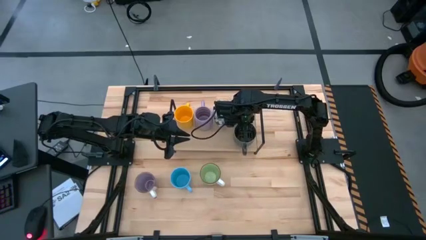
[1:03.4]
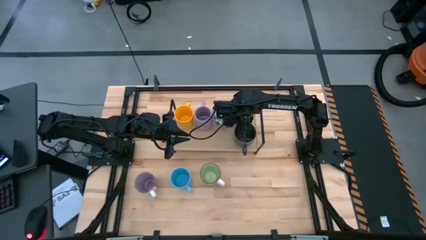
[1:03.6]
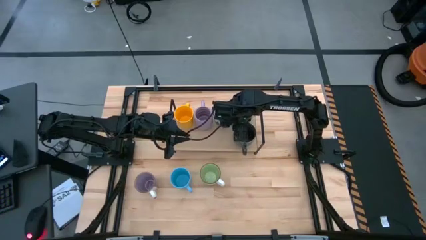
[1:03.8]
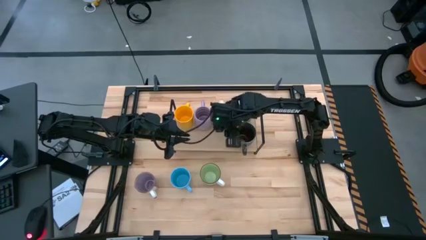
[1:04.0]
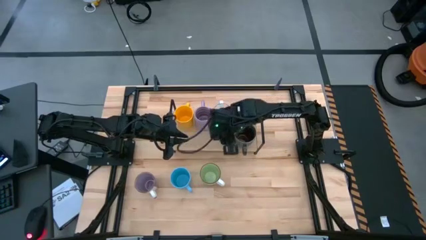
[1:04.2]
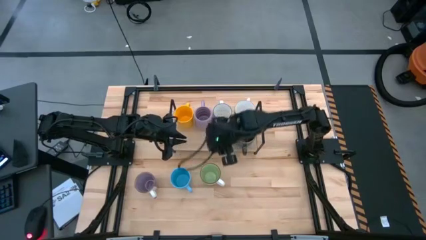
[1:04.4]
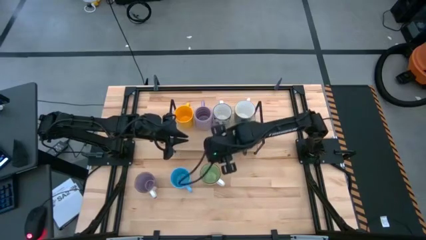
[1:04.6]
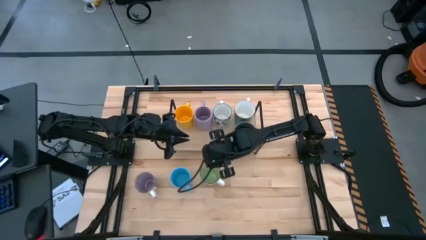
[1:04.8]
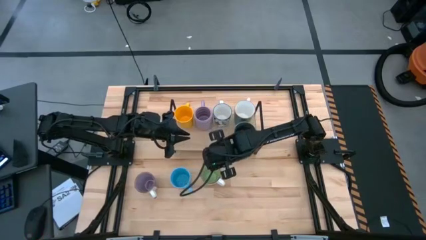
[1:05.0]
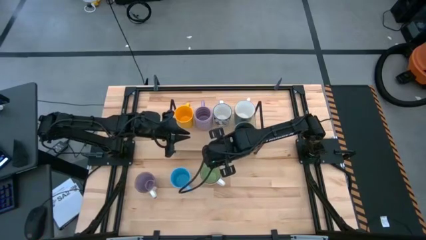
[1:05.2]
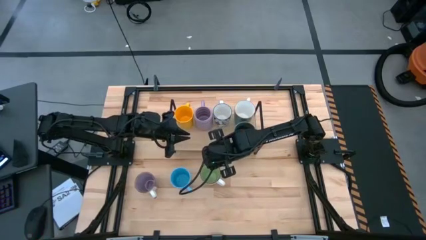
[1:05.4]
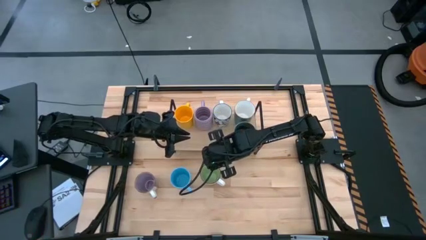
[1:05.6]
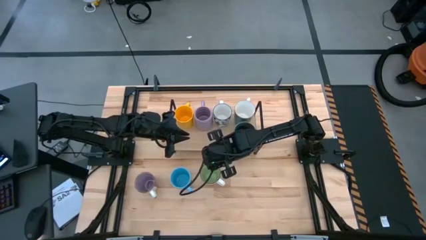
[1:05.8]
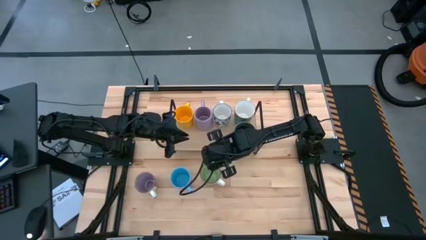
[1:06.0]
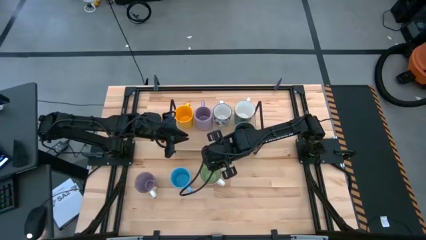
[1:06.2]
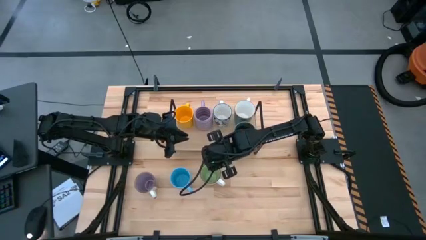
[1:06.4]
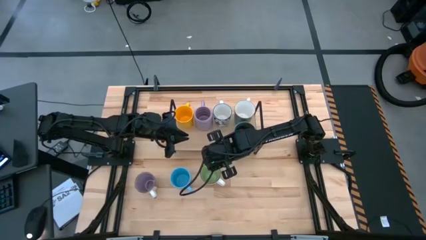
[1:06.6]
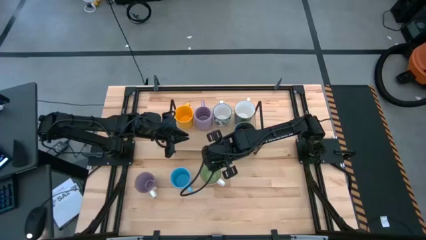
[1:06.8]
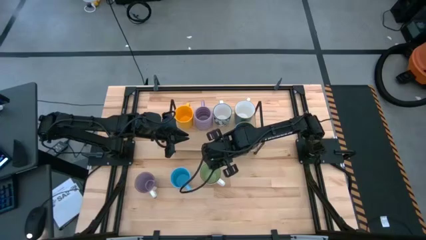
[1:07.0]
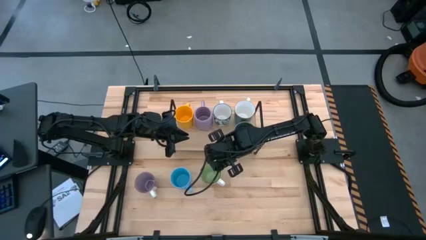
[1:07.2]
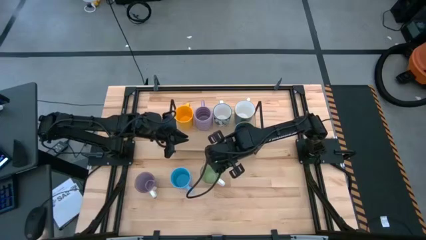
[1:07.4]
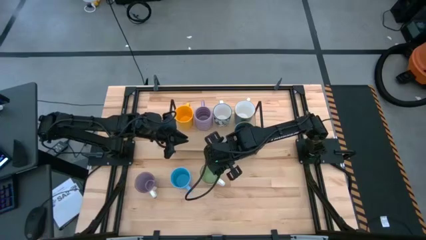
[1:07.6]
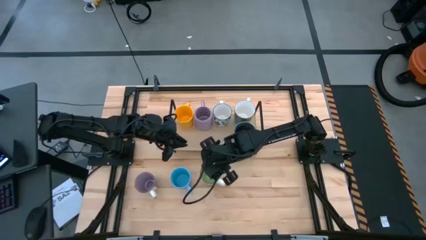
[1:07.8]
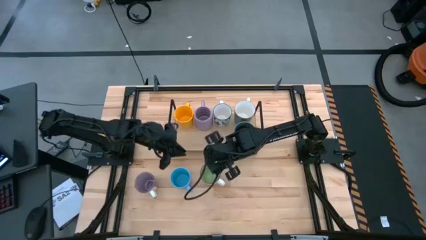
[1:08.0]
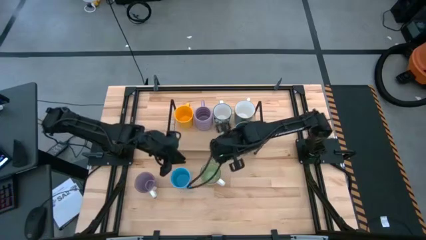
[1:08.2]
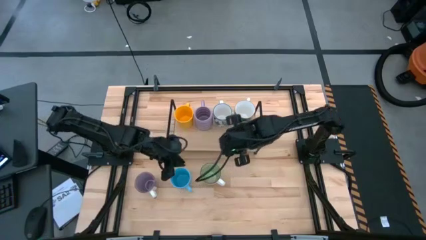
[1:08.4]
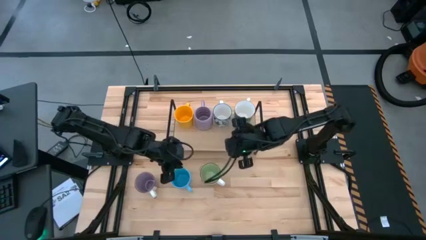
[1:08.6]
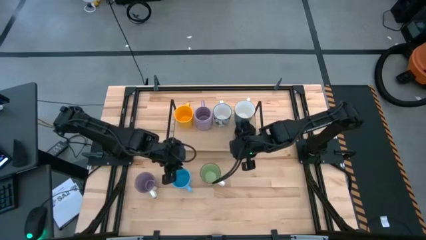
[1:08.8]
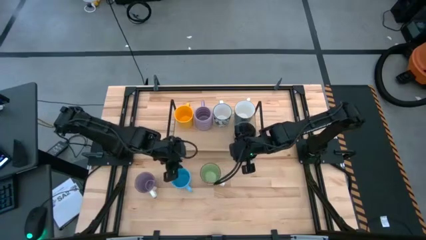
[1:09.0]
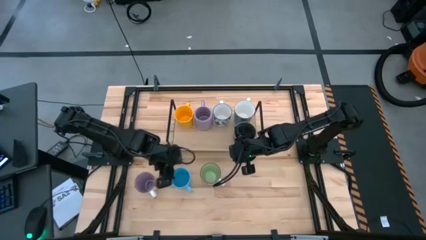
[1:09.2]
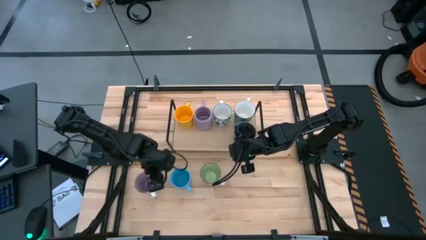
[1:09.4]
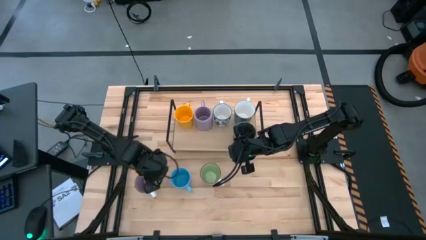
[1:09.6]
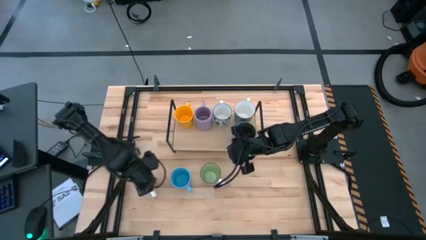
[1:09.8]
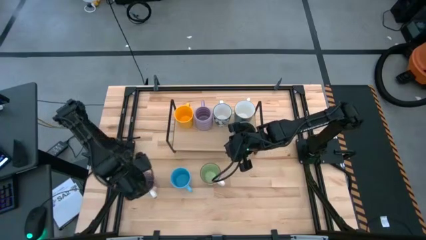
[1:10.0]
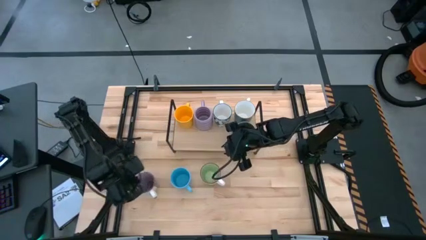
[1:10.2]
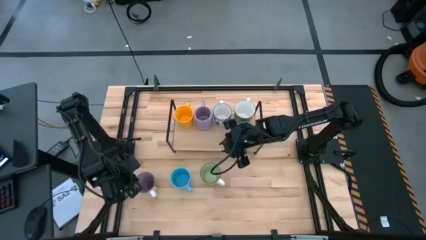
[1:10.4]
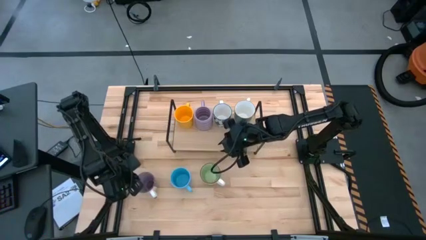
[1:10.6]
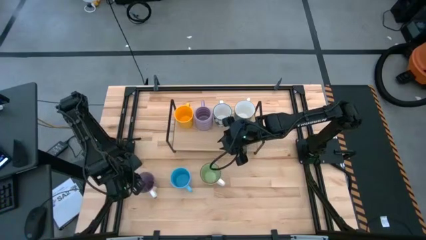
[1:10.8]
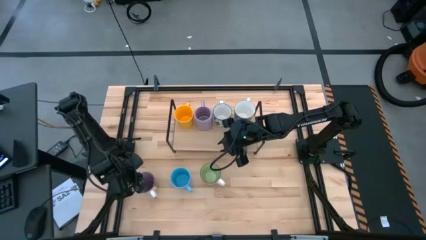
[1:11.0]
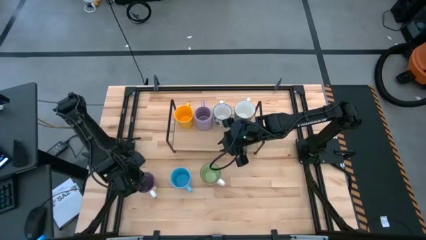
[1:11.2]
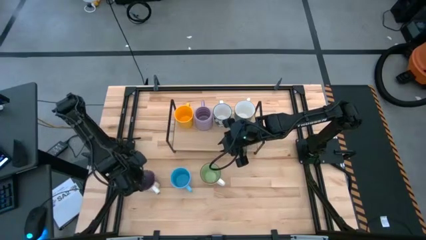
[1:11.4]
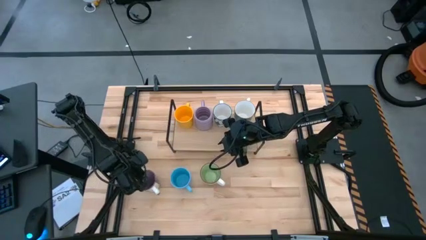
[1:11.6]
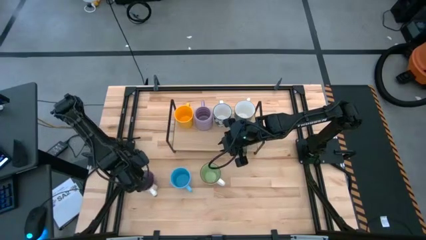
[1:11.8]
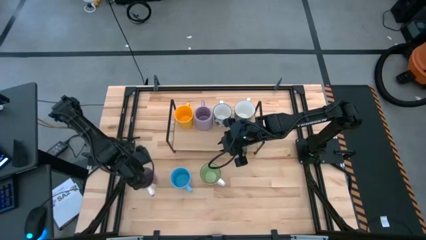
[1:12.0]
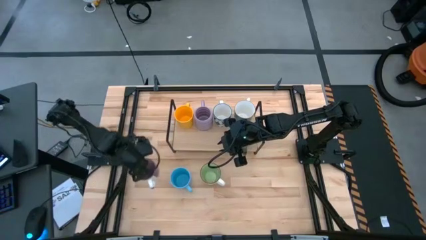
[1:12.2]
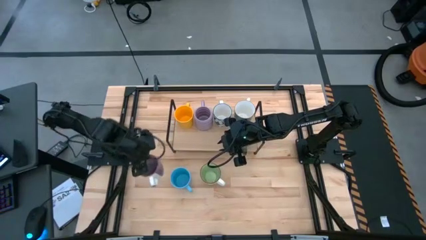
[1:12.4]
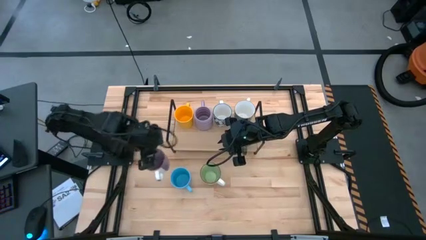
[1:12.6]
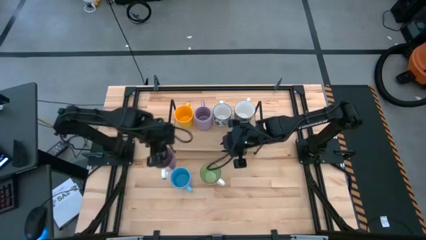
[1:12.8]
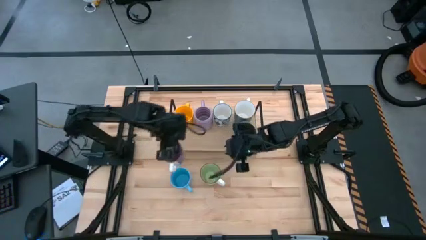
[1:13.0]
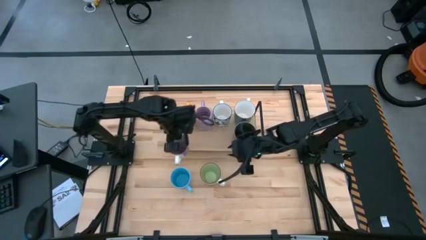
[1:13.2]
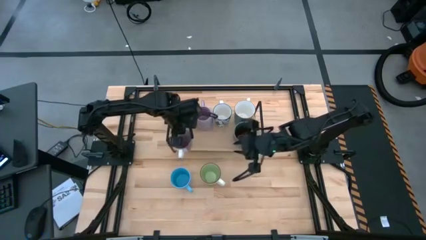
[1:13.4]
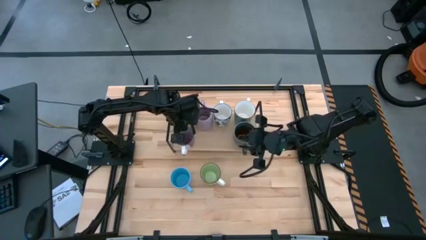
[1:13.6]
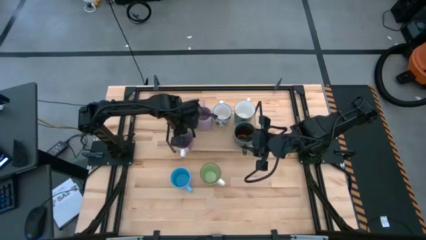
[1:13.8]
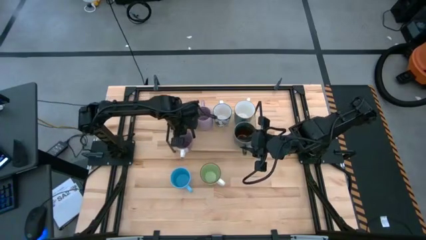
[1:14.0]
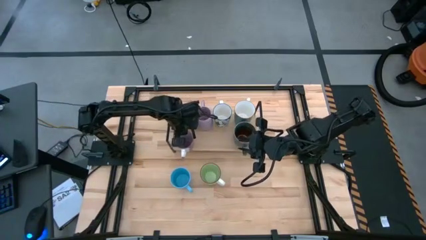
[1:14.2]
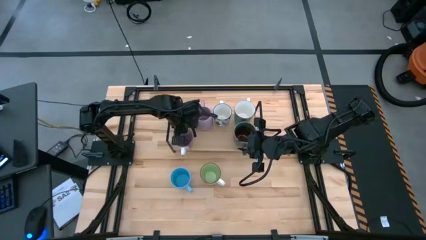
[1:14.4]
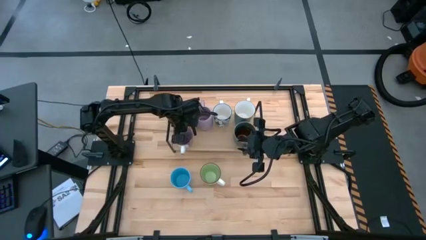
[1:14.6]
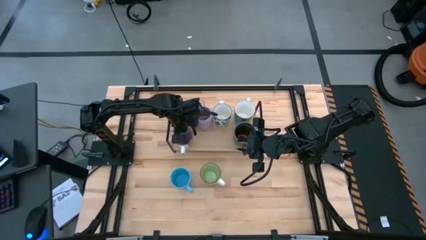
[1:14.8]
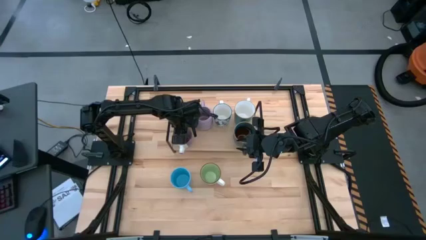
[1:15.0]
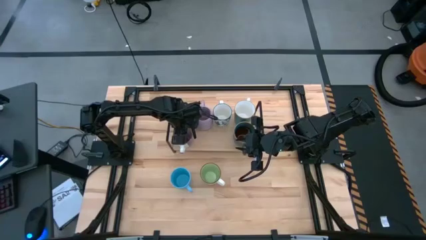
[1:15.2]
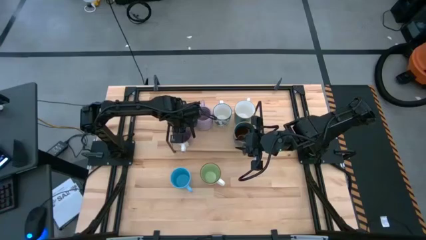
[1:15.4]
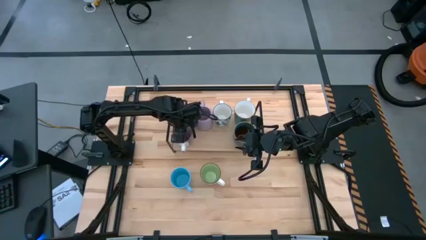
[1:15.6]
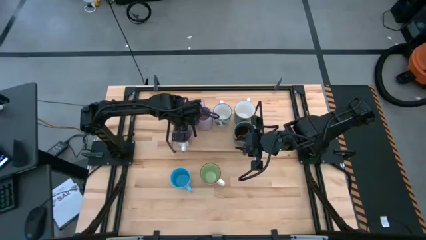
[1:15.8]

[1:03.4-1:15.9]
Task: Place coffee mugs
Put the violet mug on the shelf

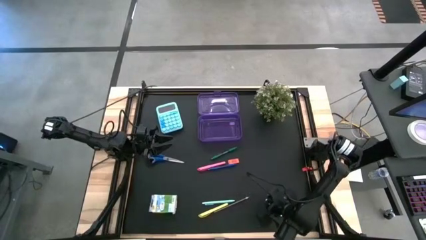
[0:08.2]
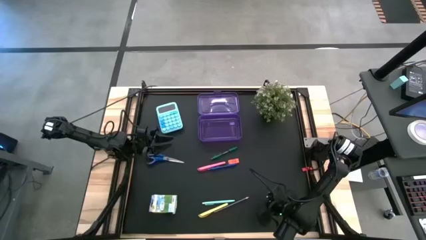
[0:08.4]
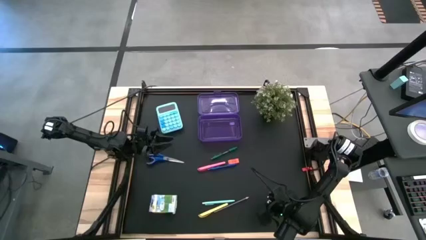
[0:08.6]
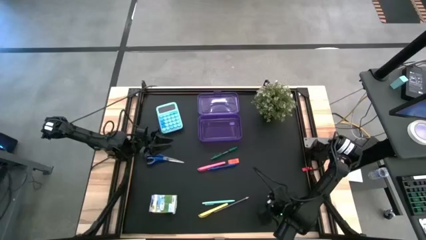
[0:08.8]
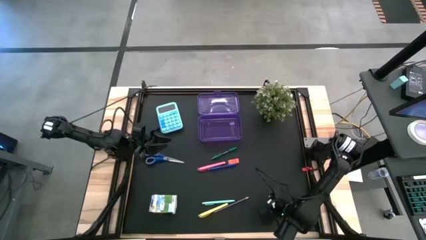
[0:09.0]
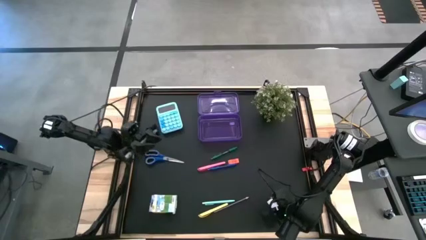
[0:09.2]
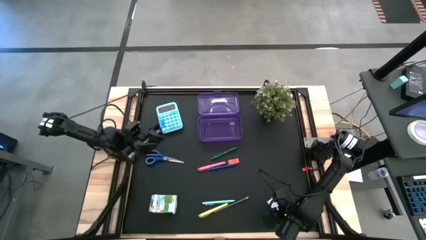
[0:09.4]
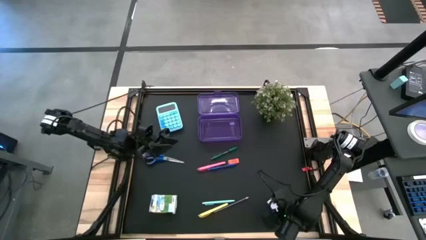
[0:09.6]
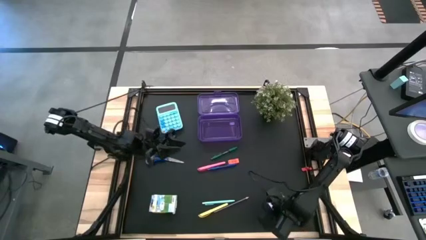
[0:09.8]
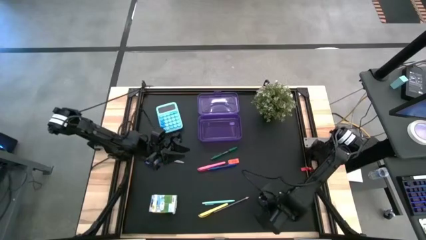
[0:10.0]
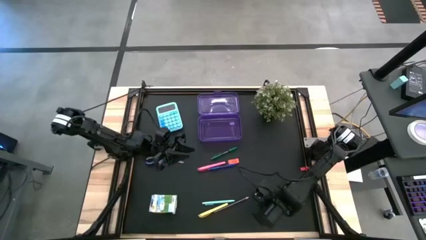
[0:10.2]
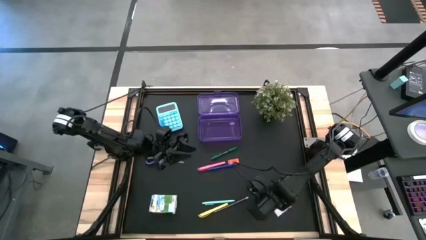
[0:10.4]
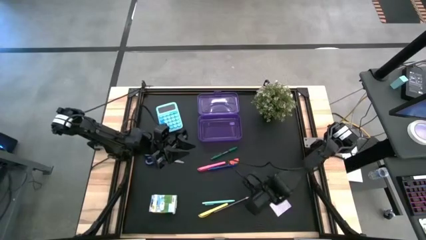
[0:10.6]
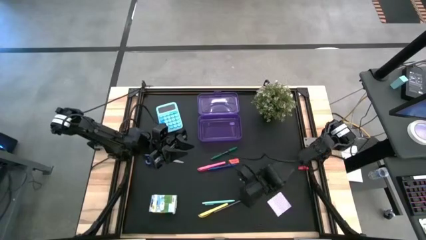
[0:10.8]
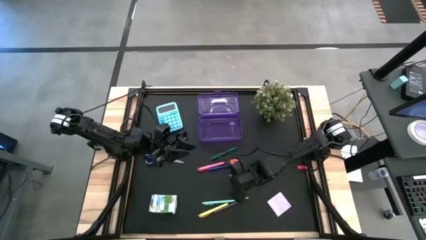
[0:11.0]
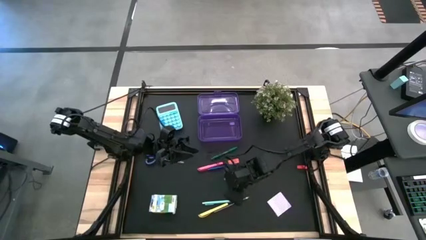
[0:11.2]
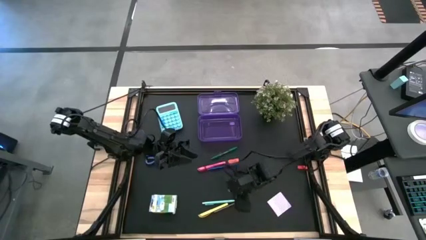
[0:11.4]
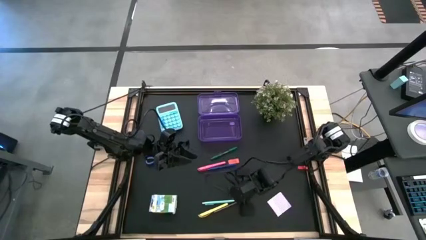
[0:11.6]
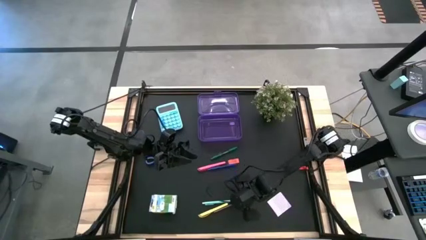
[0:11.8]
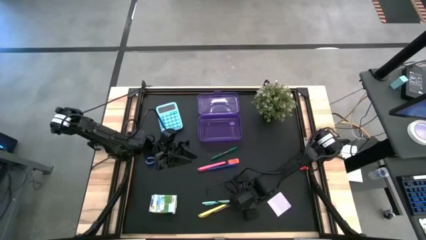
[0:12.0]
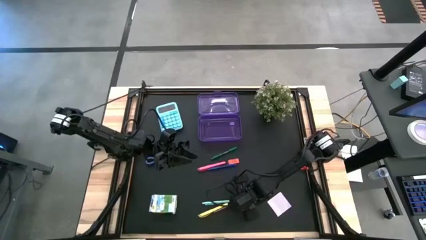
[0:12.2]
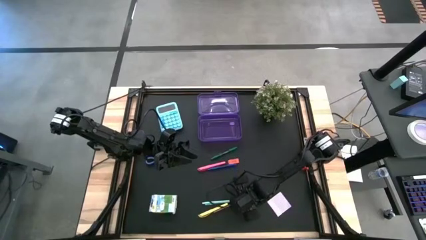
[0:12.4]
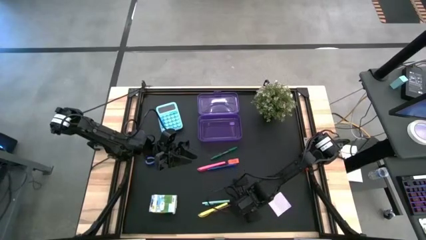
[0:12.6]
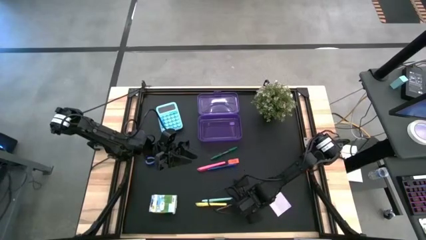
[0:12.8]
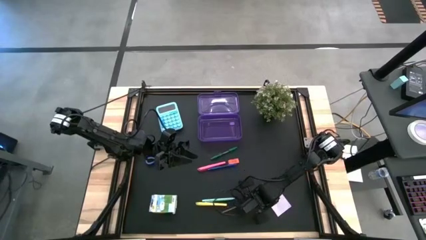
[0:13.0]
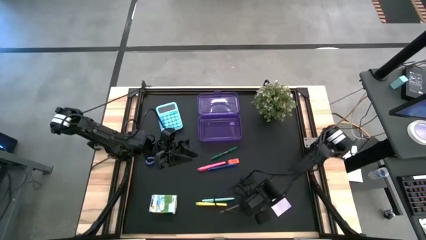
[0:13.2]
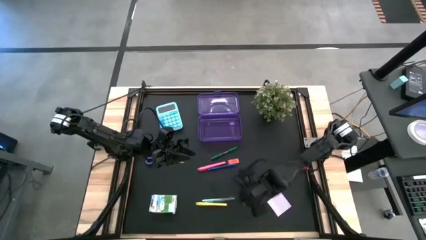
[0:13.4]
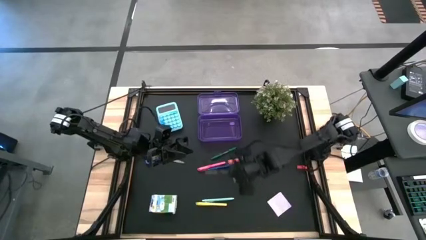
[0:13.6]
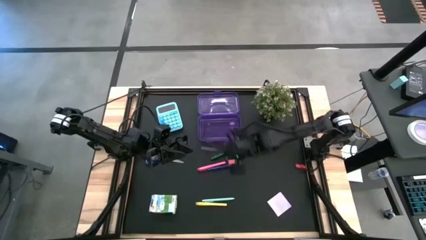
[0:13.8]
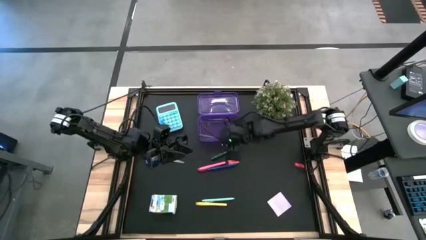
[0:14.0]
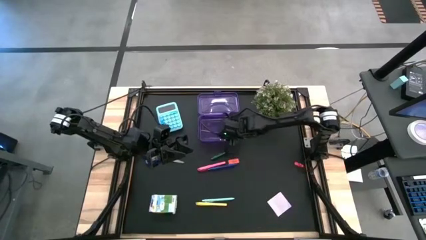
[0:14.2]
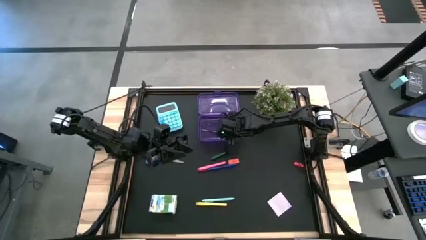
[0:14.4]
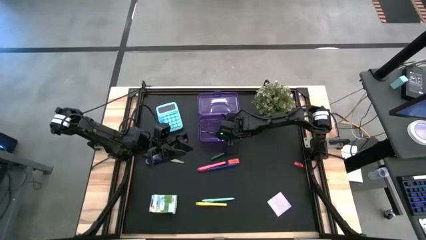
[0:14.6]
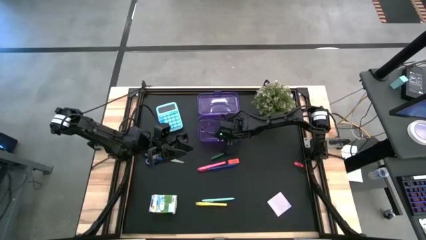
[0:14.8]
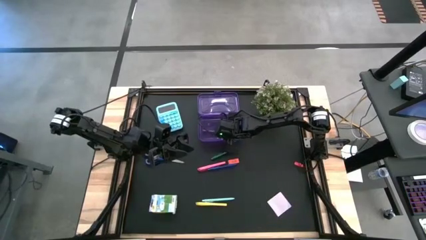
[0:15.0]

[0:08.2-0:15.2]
Task: Pack school essentials
Put the blue pencil into the purple supply box
